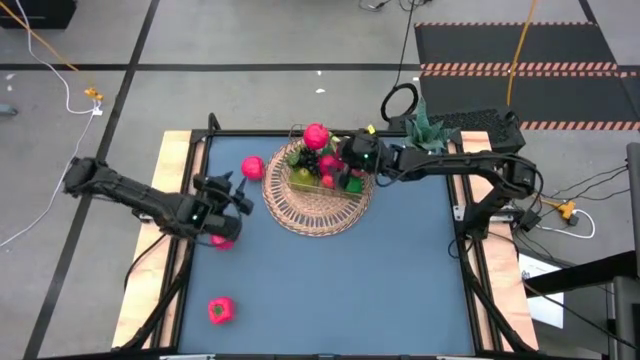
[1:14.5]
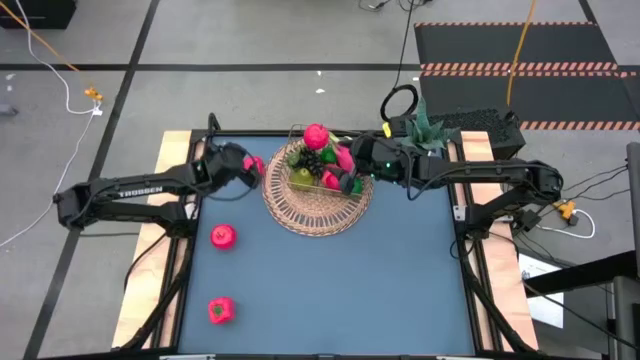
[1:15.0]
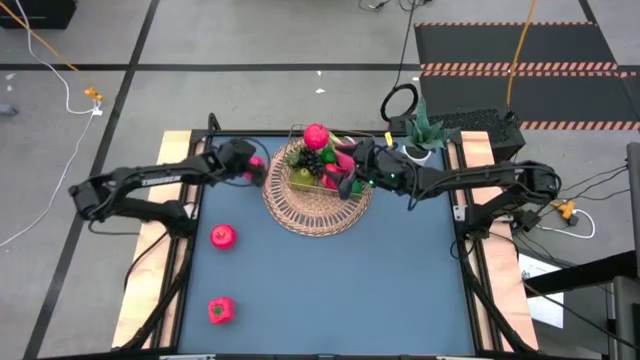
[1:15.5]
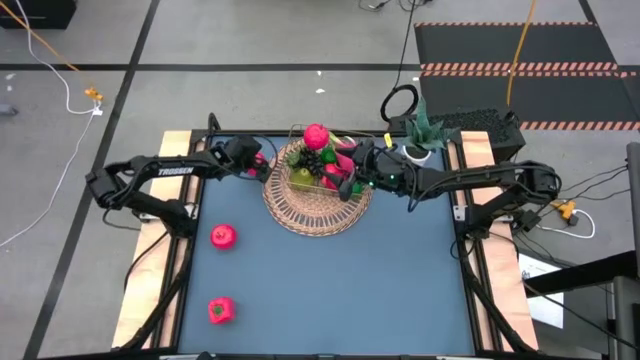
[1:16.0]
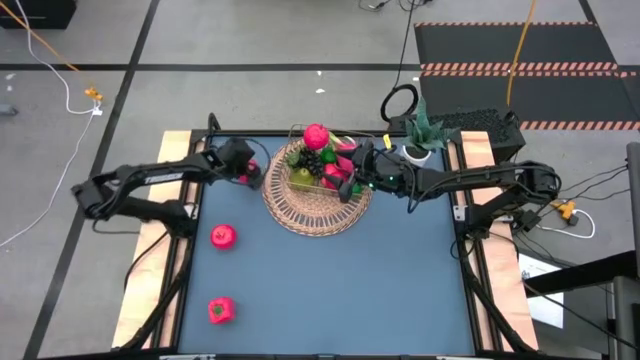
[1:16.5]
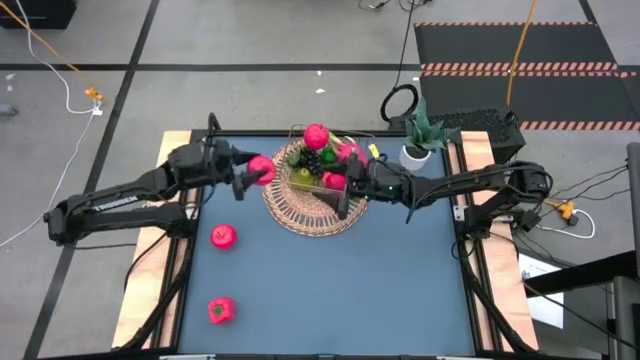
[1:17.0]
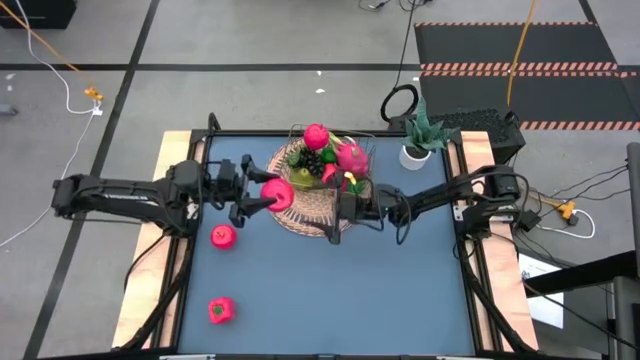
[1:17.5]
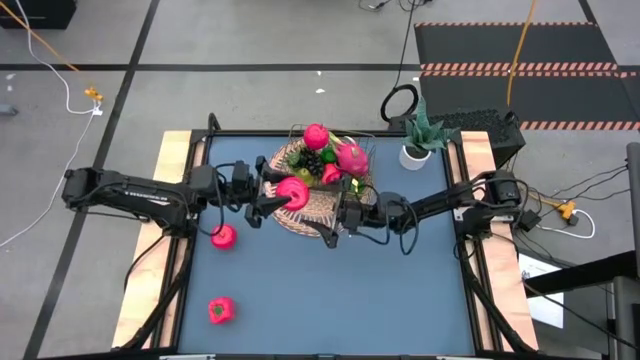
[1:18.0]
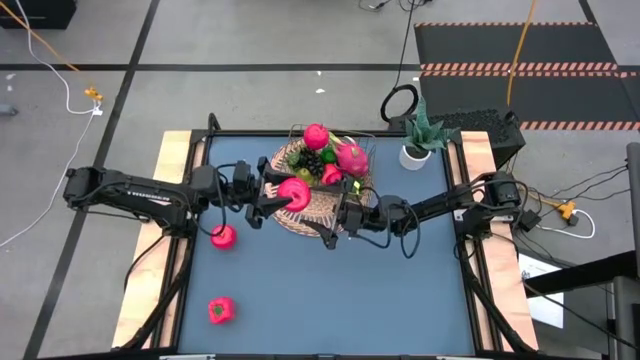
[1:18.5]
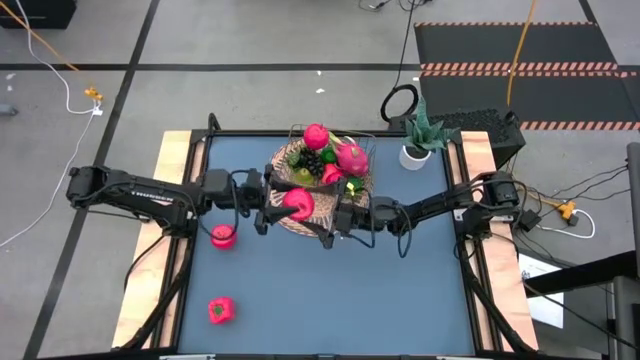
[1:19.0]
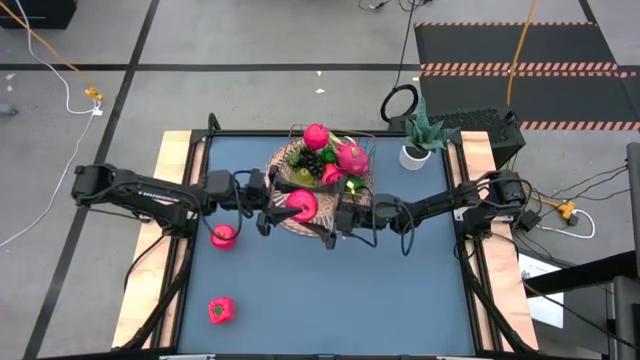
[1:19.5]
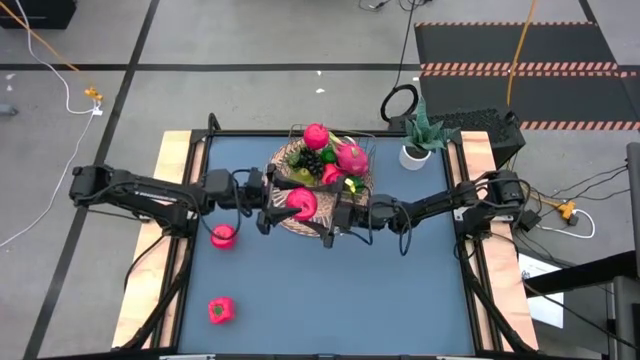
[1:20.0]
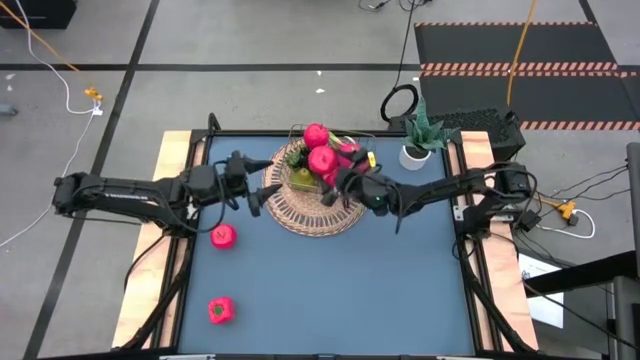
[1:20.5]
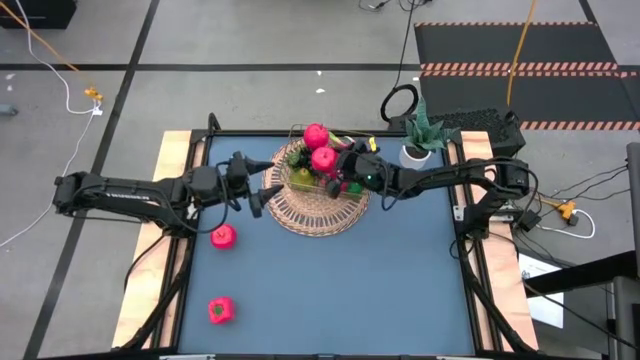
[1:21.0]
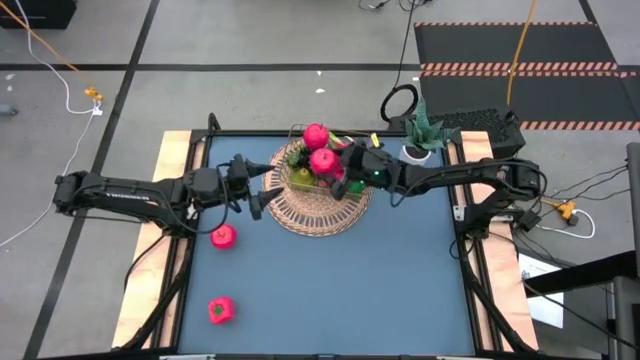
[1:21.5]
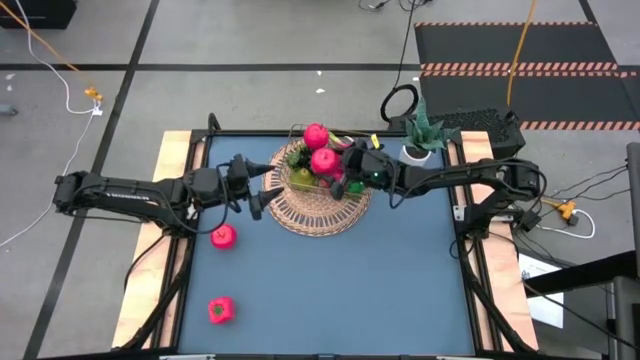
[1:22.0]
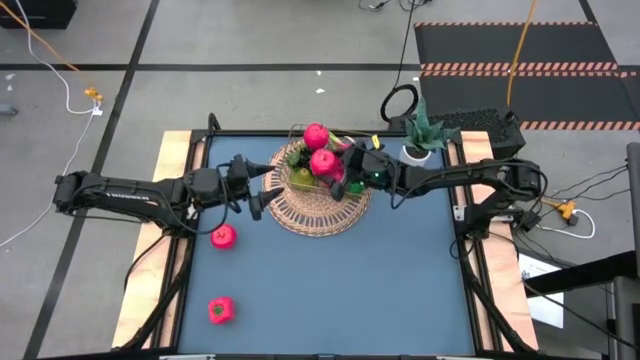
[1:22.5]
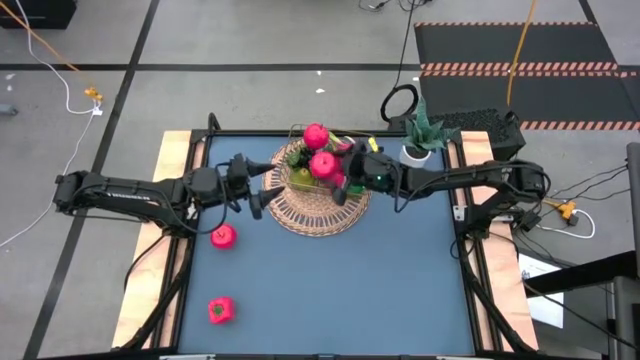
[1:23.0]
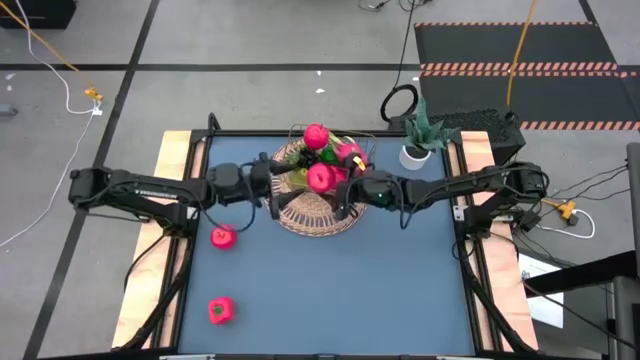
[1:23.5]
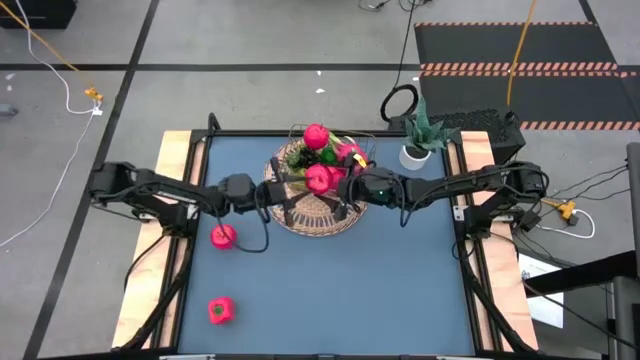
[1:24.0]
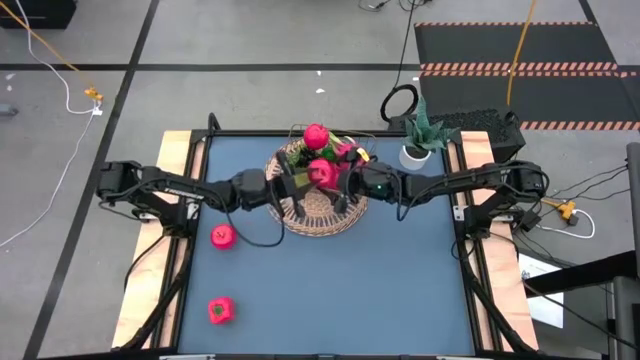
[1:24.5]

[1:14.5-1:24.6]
Task: Build produce basket
Put the apple into the gold wire basket

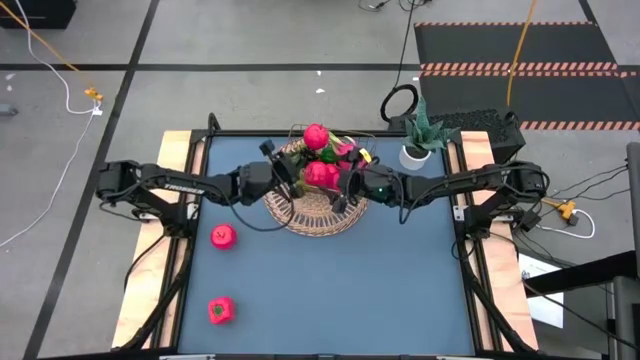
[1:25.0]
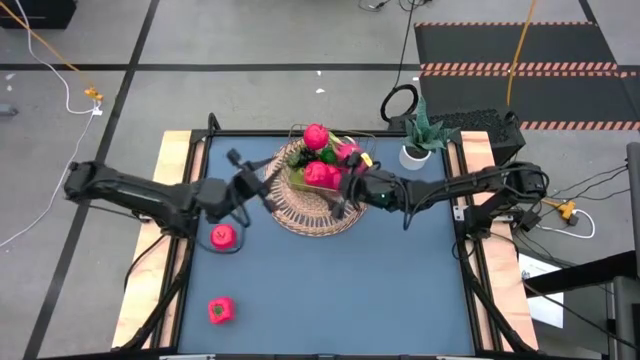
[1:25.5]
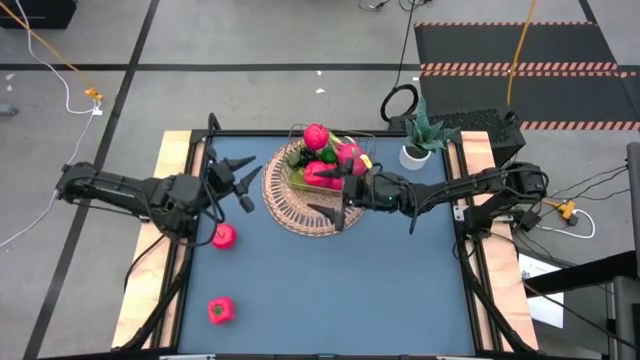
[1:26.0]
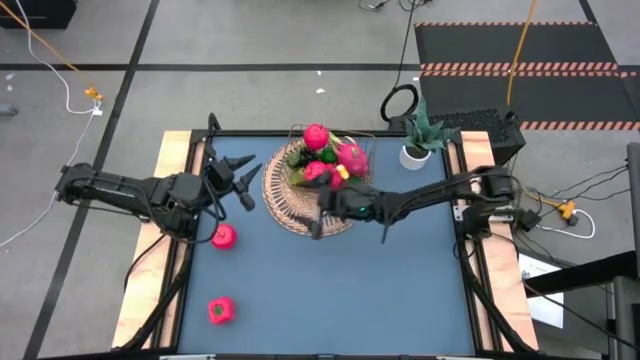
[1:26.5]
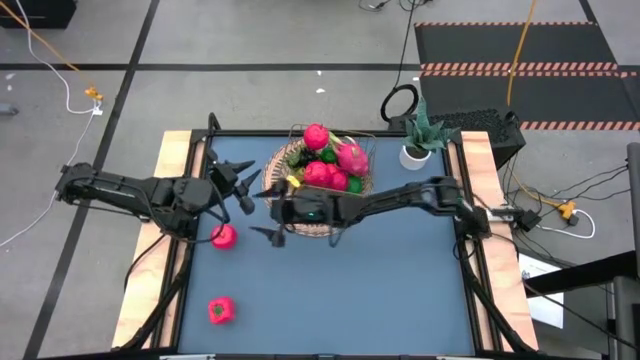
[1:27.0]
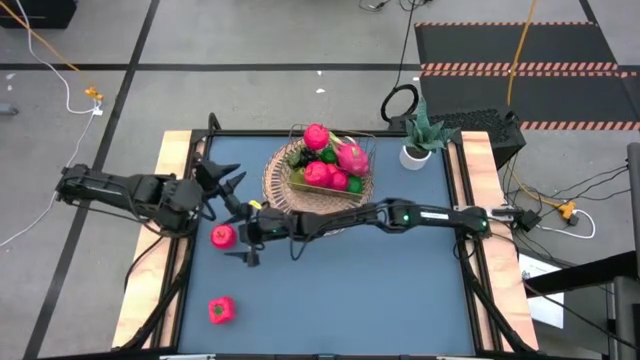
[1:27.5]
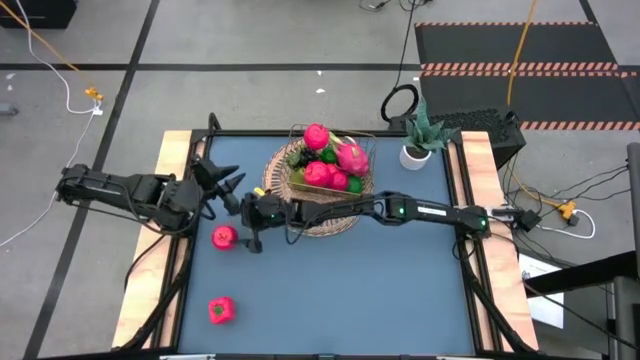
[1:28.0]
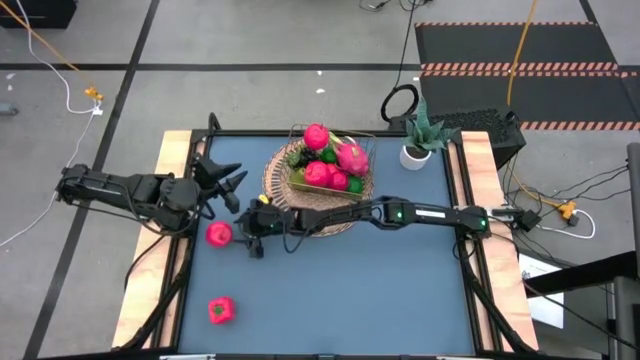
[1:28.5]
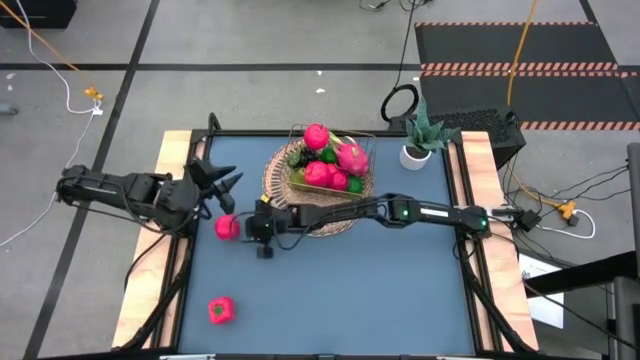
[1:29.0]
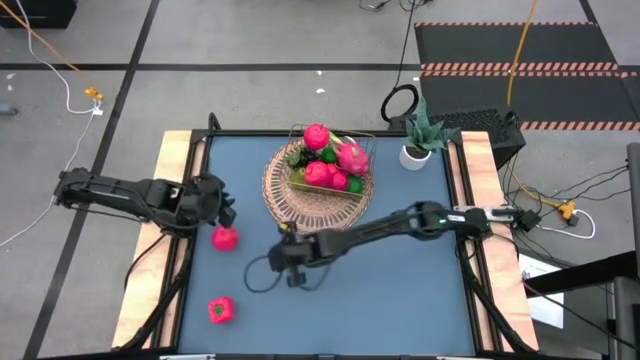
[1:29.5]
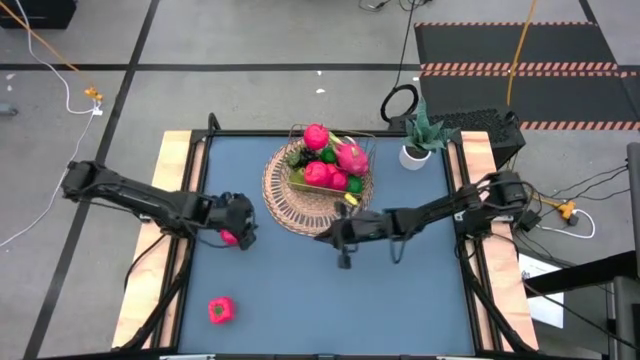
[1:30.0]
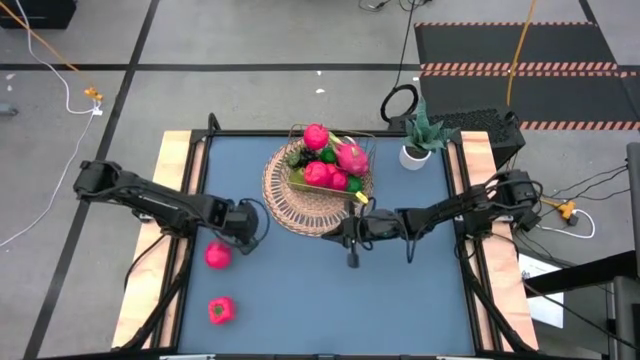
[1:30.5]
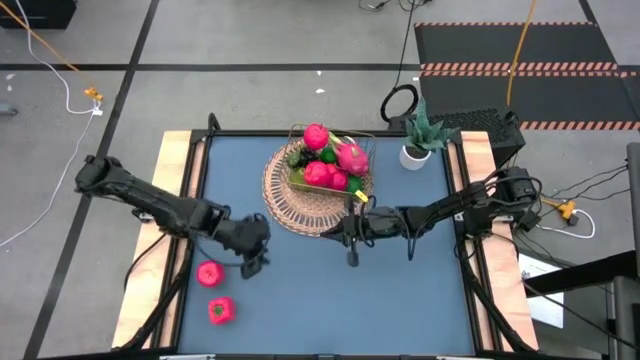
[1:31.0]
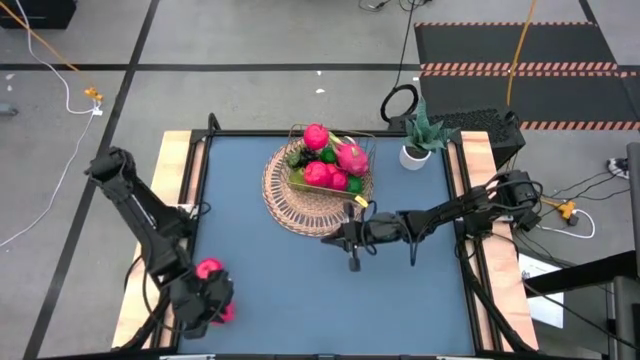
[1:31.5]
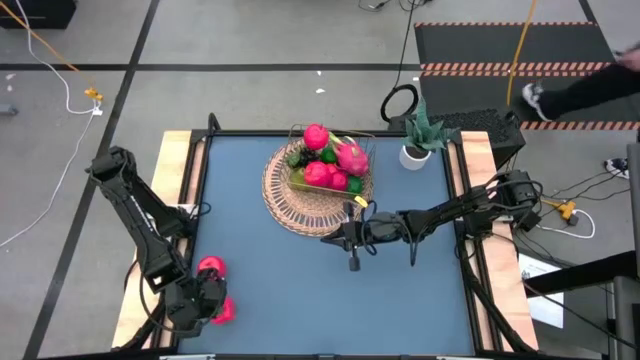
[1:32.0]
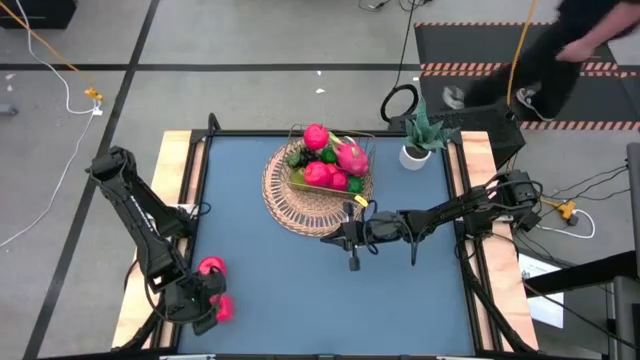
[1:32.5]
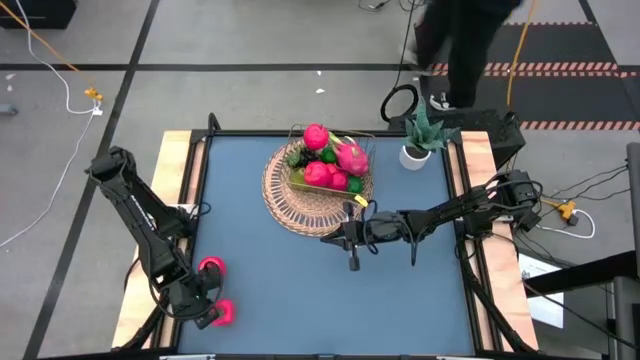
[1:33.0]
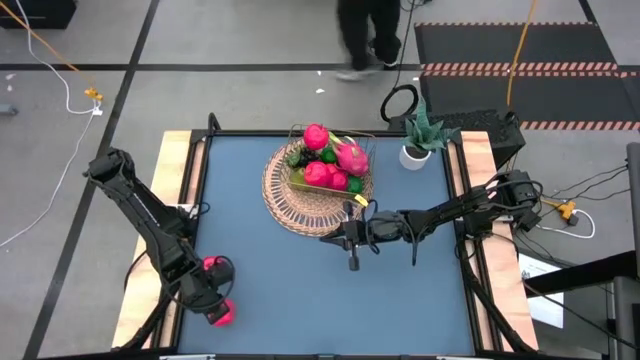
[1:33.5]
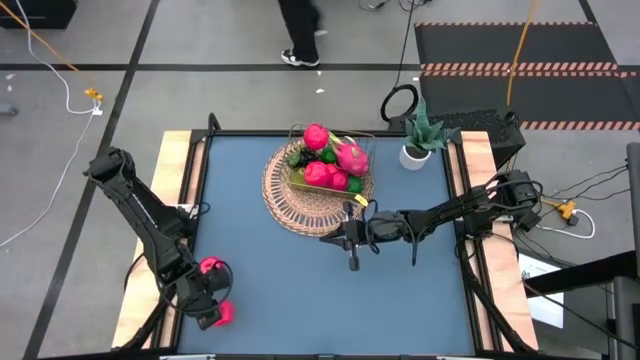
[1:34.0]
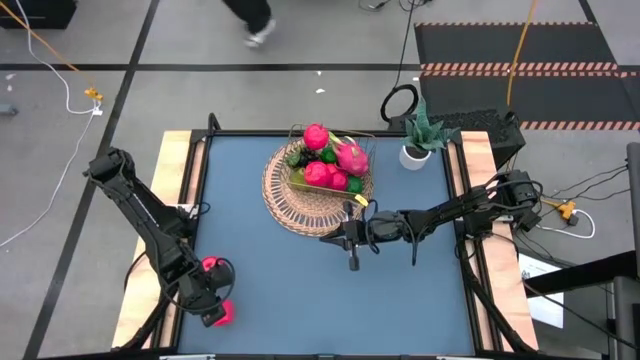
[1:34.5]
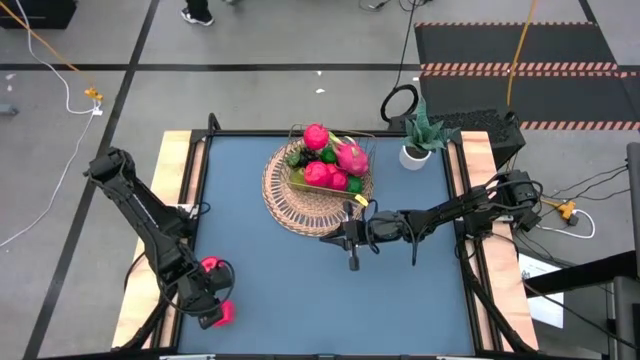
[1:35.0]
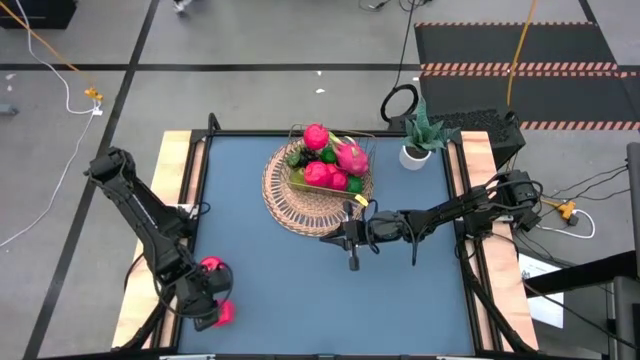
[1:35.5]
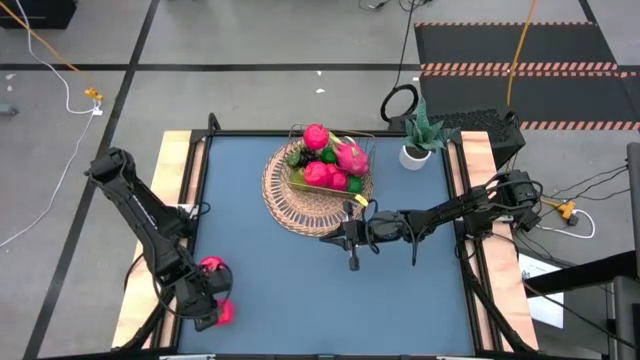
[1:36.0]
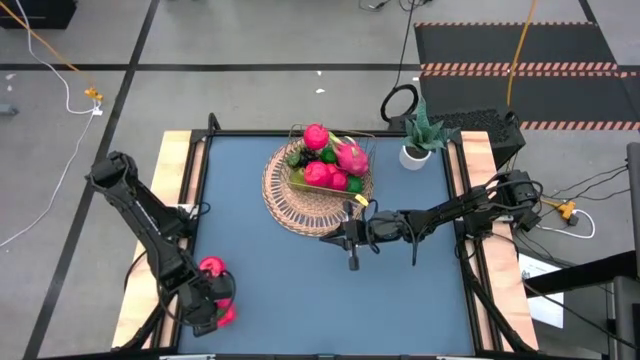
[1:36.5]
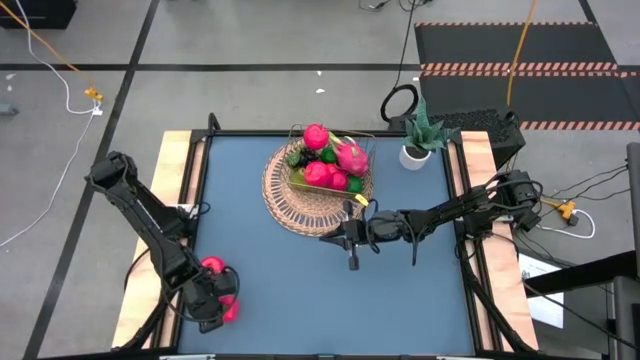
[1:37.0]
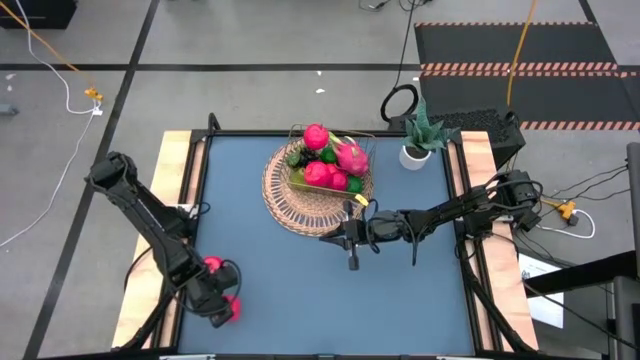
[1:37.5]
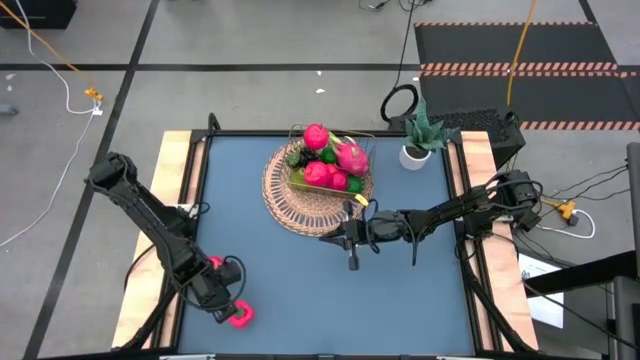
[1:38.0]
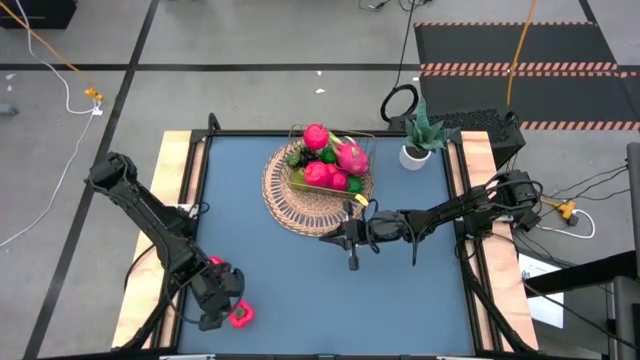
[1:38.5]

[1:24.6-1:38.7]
Put the bell pepper into the gold wire basket
